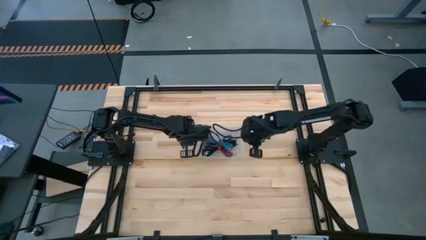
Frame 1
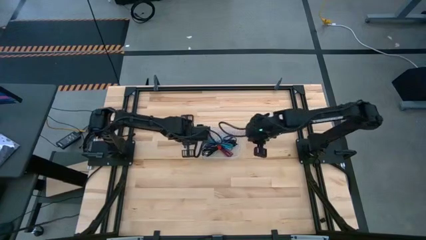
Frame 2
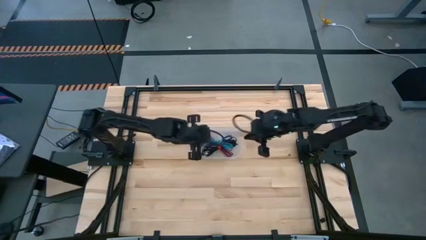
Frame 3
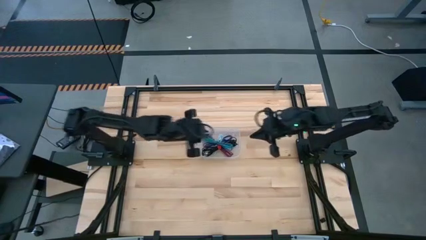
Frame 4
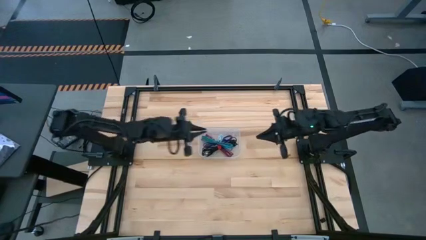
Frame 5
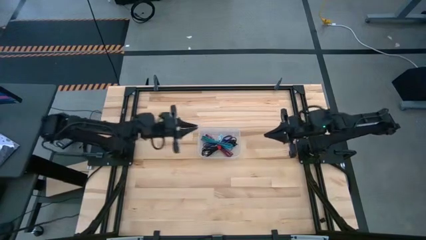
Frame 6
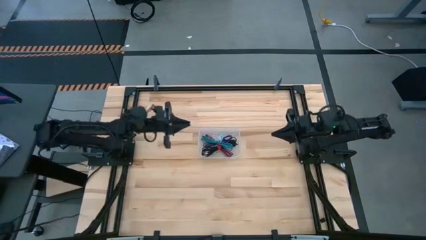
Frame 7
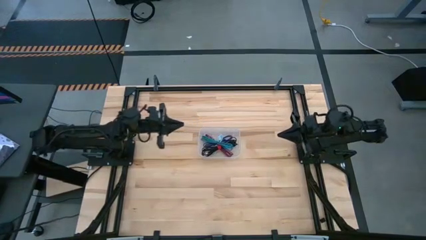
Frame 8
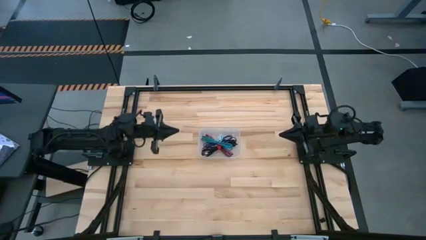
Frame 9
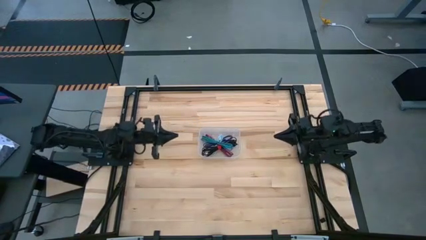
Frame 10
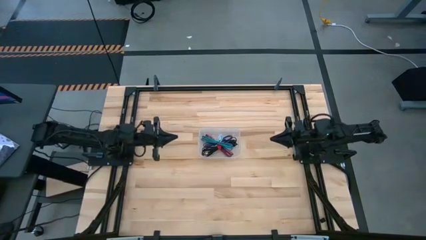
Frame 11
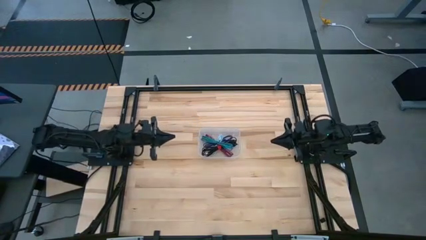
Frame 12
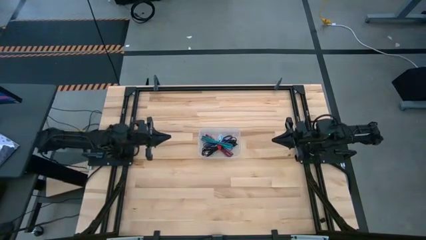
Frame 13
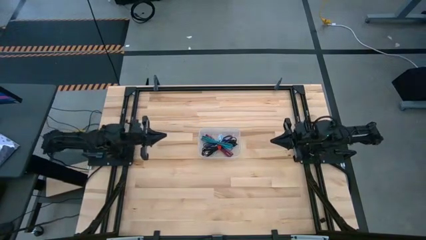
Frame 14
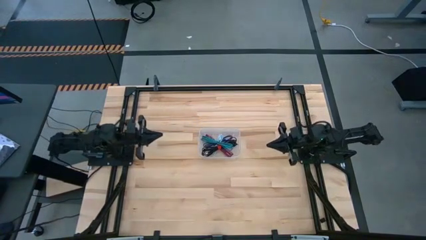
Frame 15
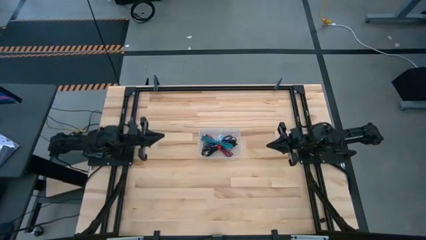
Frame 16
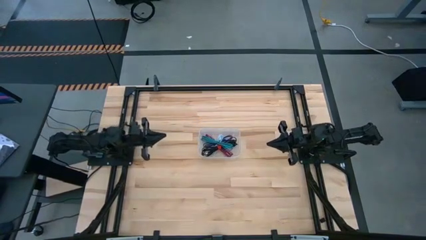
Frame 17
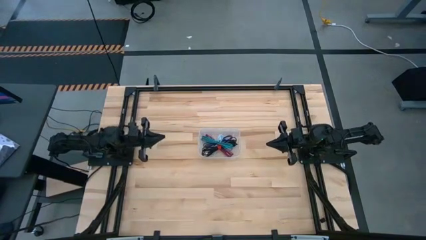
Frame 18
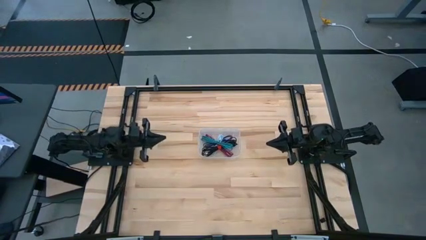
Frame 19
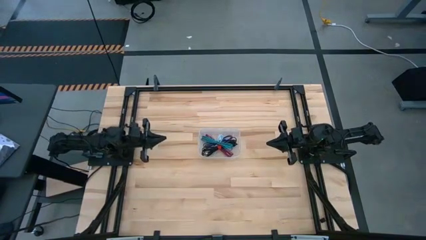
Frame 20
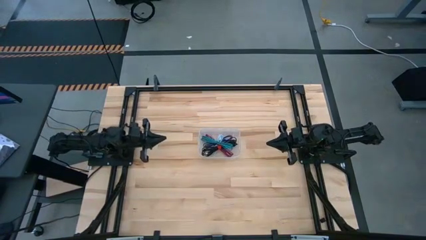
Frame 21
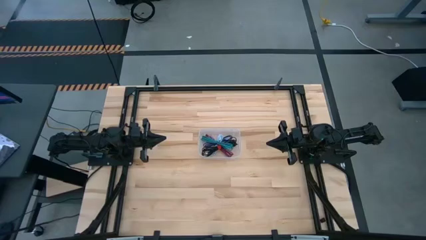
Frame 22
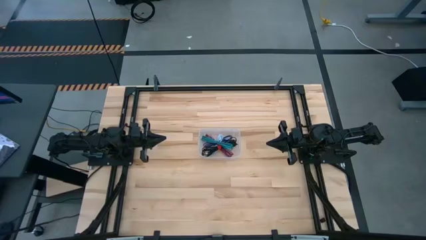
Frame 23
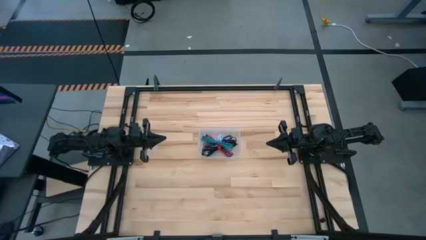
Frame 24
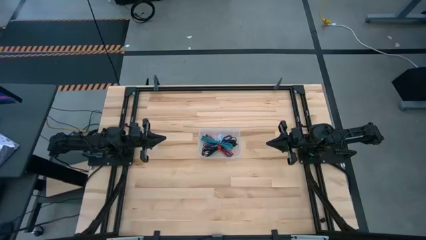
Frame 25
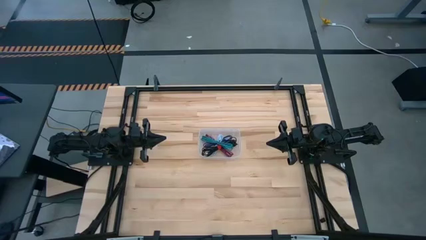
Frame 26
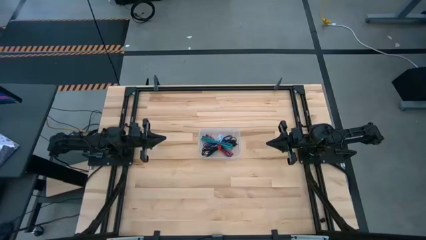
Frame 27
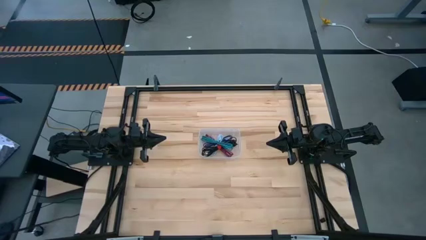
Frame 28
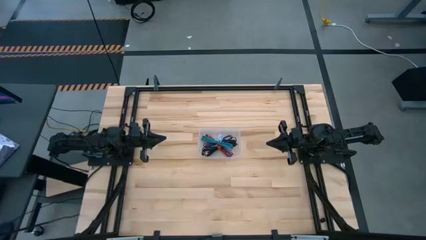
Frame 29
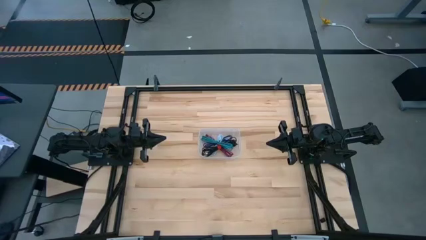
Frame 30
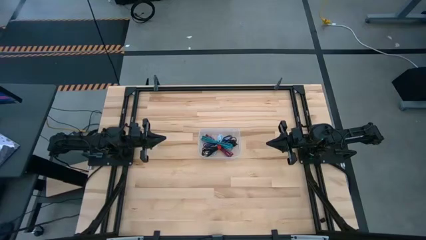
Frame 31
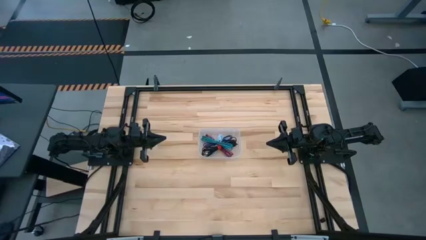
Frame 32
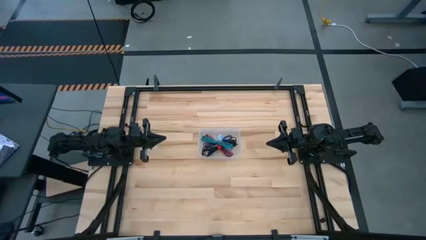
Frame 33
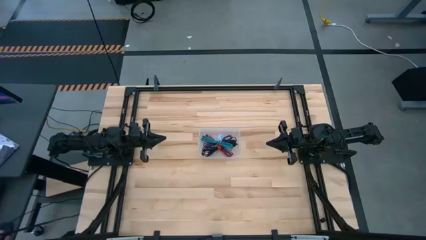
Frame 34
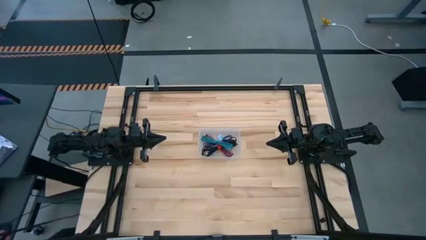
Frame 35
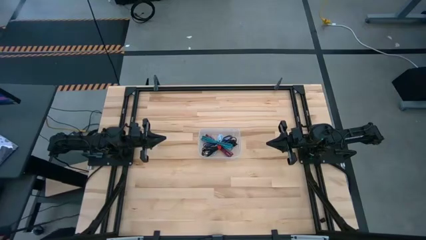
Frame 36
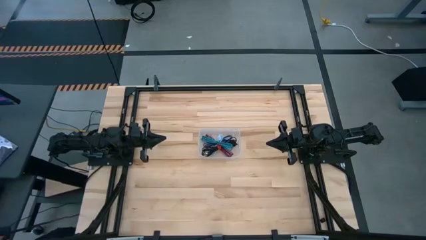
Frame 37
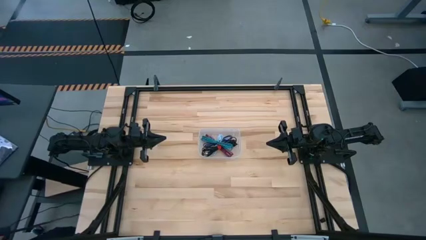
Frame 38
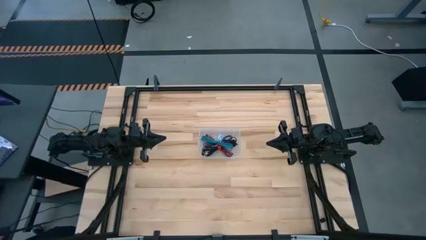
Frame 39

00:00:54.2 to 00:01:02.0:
Task: Pick and place USB-C Cables
Return to Home Position

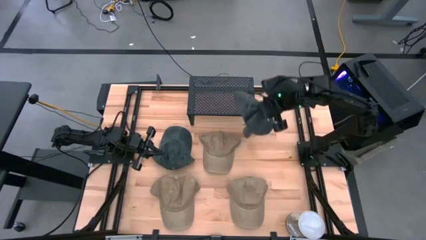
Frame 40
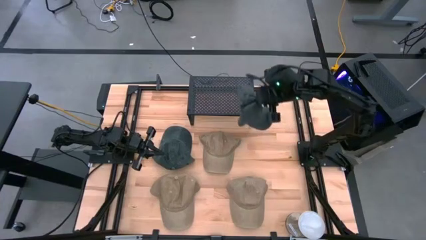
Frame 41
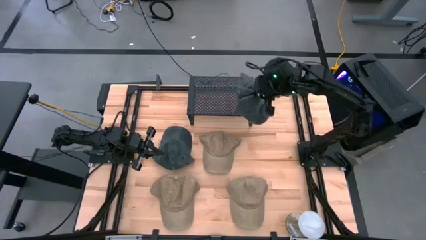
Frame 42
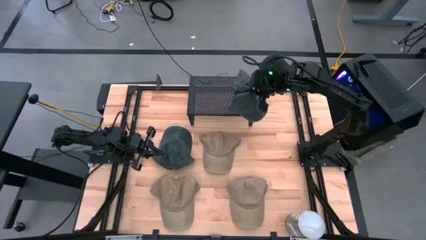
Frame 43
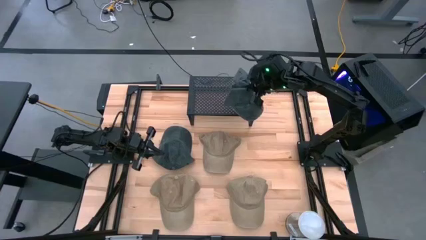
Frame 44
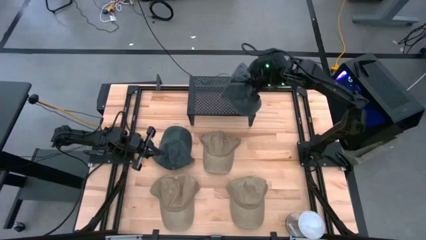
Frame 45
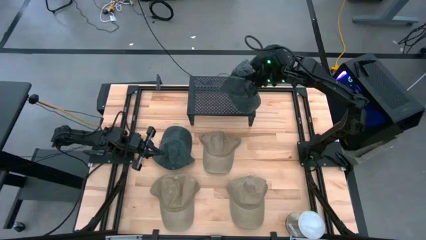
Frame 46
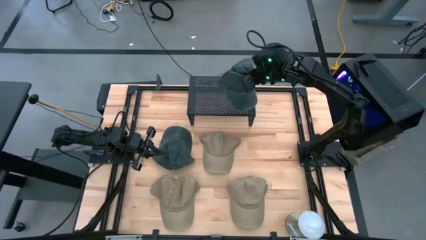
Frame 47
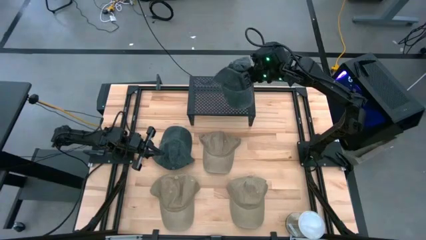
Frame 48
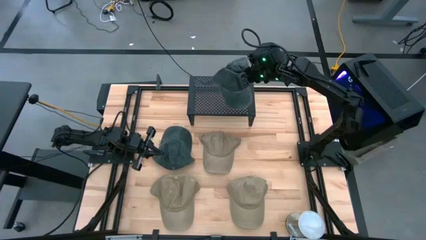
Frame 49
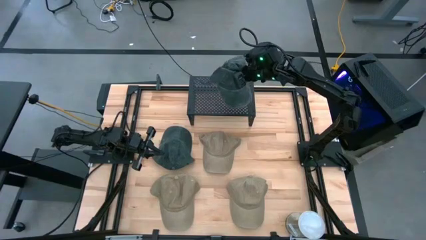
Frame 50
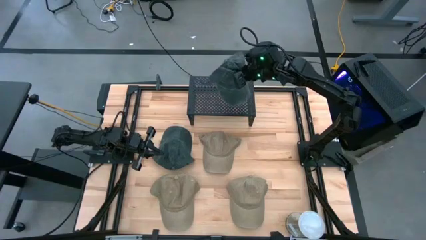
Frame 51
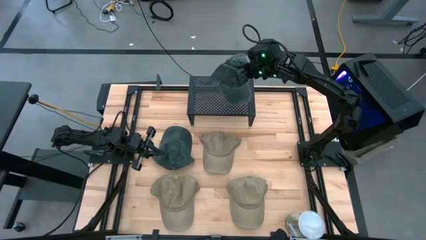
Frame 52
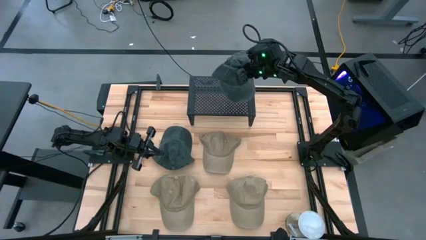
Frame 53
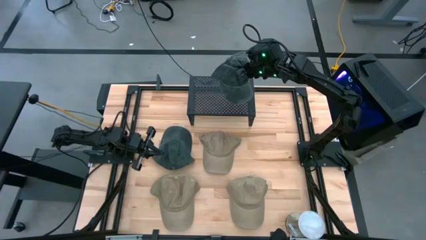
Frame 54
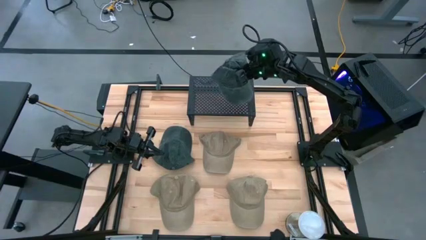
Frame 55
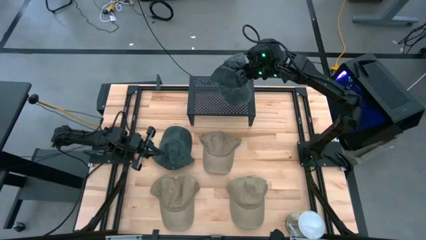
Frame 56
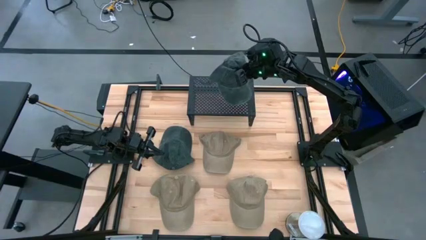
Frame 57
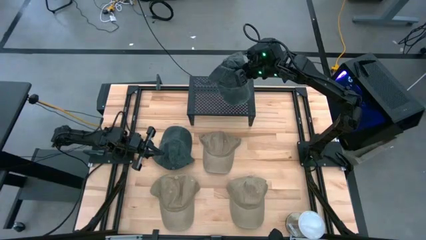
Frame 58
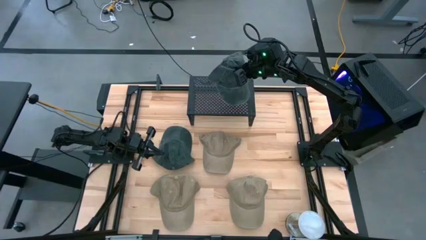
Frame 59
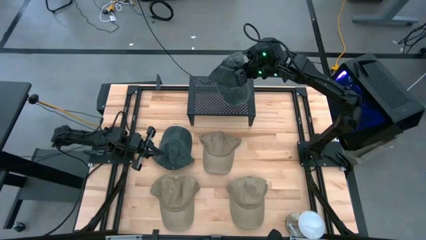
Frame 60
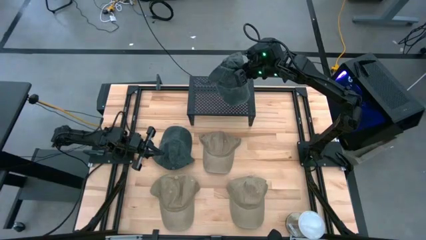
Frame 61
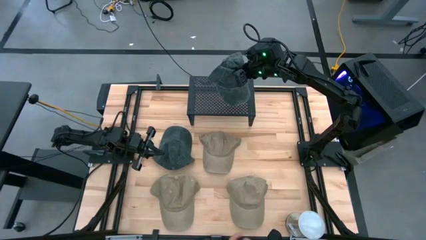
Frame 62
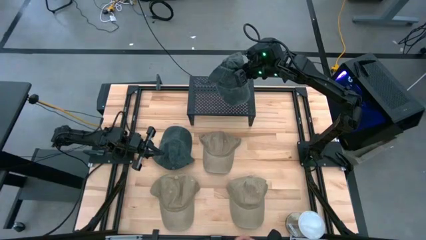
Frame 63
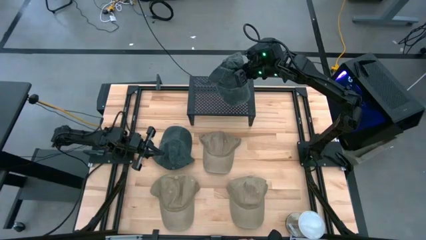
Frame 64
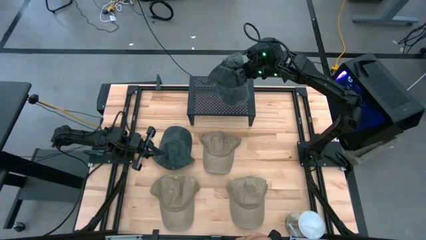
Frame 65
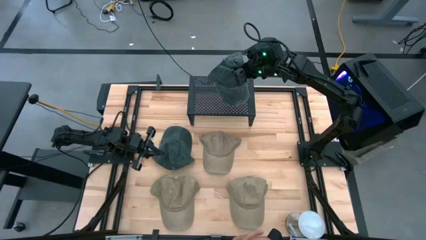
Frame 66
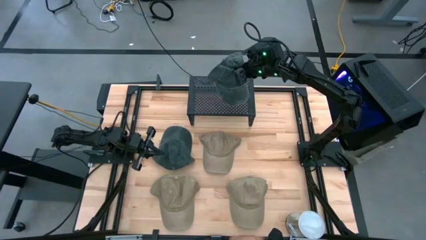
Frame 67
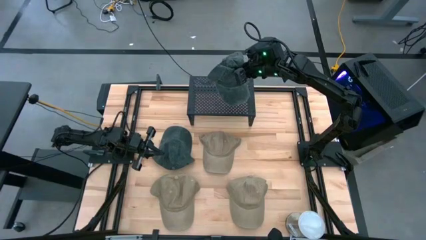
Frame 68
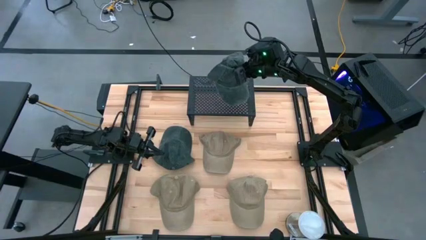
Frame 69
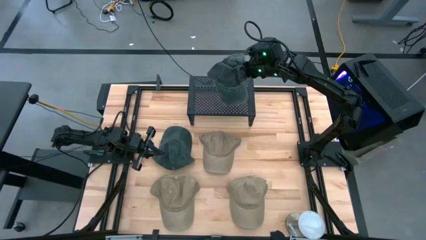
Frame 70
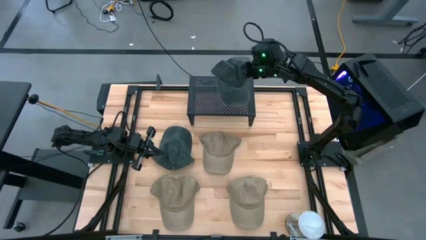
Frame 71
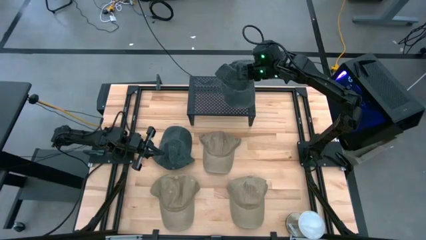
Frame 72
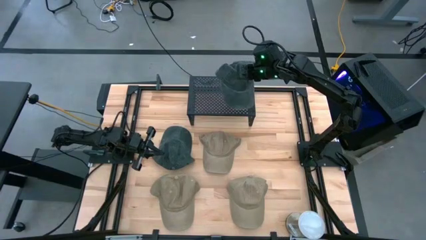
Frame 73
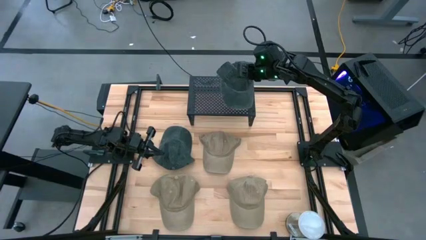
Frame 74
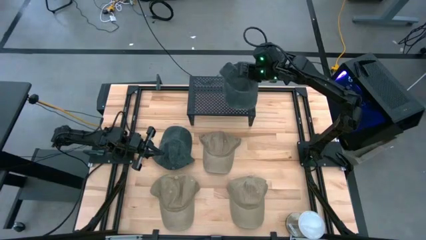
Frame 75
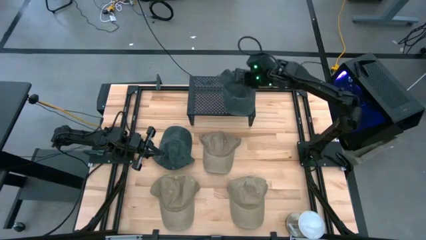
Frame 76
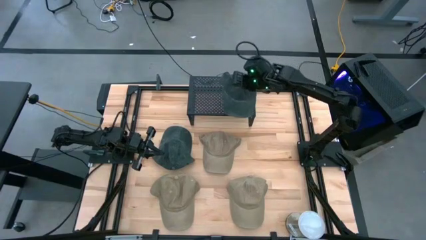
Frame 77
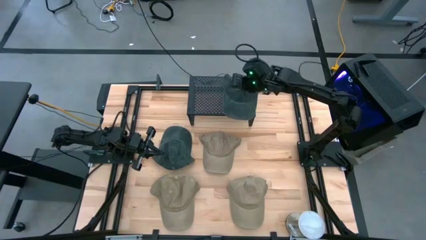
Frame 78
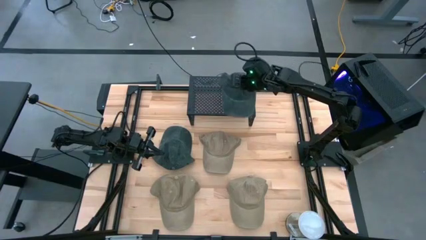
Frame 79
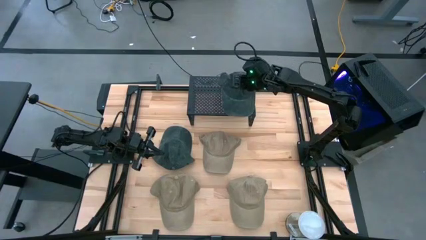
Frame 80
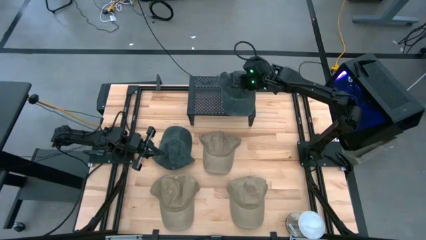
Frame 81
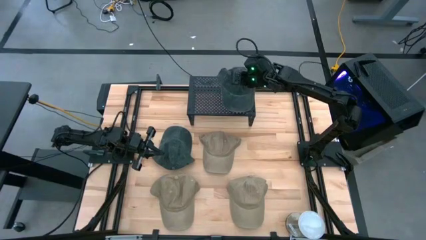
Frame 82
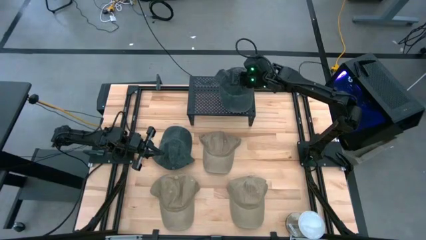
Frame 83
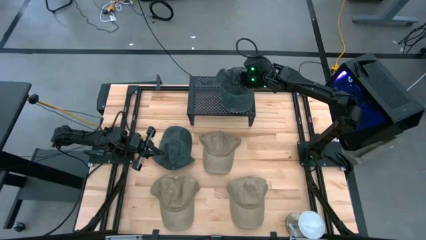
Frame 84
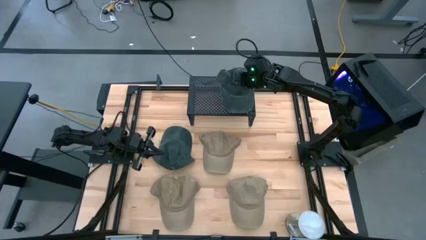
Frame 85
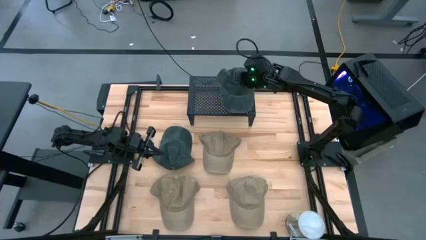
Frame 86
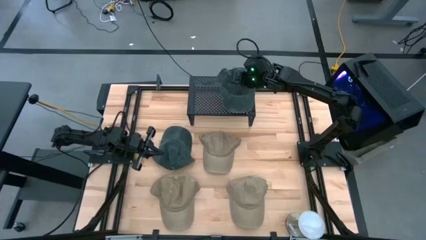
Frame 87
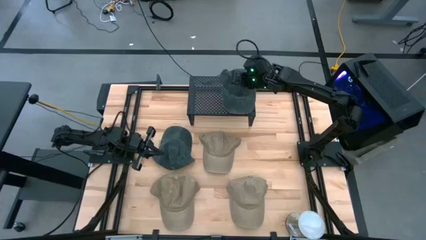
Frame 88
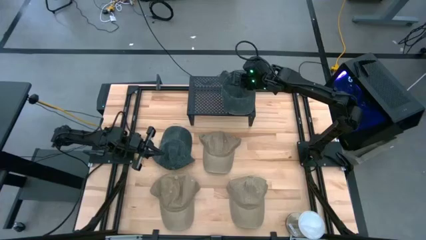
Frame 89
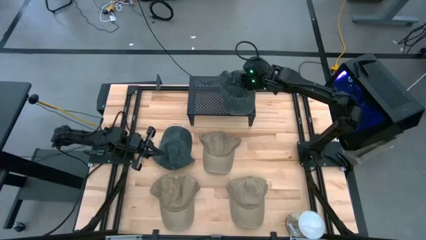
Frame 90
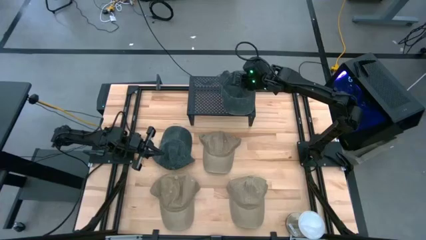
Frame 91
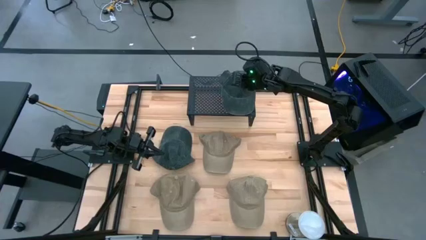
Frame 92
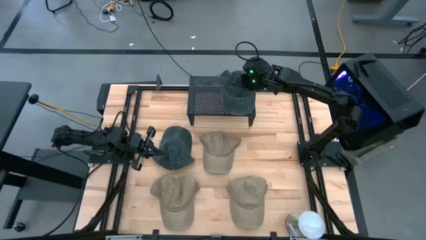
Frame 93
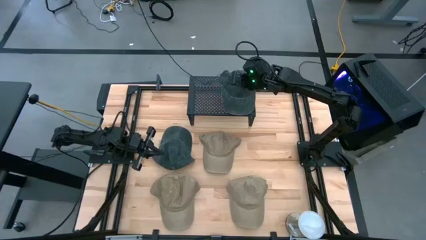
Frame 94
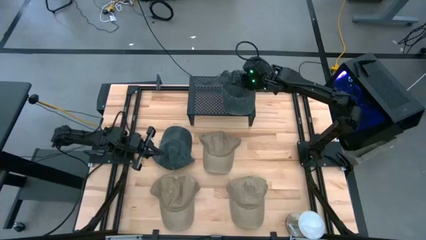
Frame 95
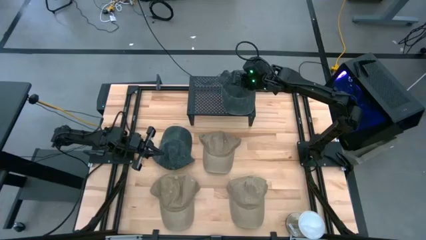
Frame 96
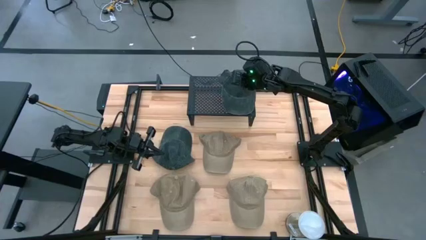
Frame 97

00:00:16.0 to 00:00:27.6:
Task: Pick & Place hat
Put the right black cap on the shelf
